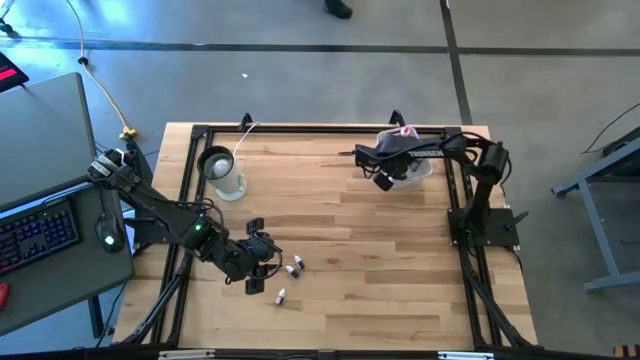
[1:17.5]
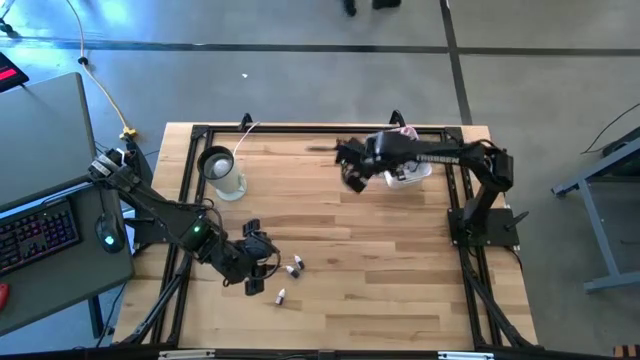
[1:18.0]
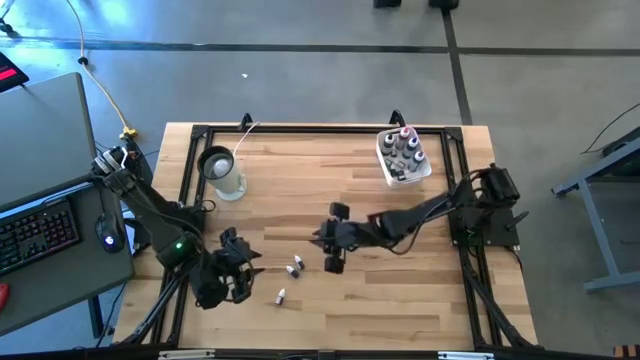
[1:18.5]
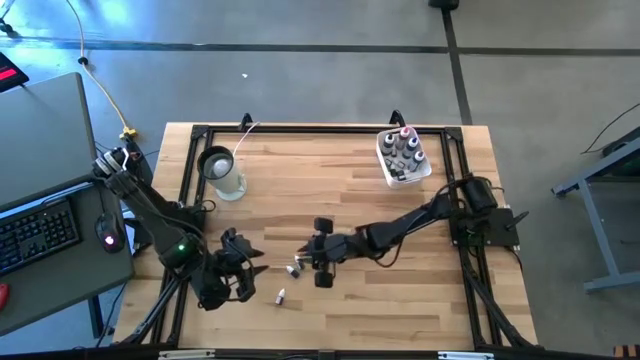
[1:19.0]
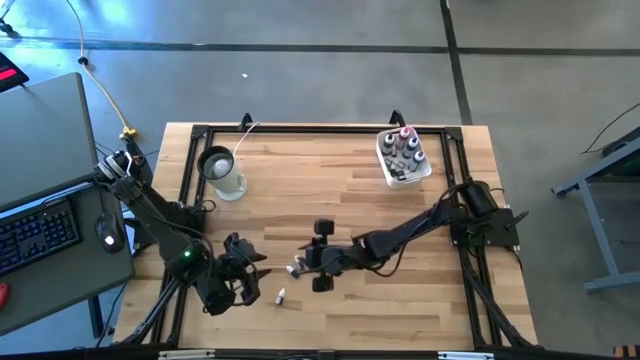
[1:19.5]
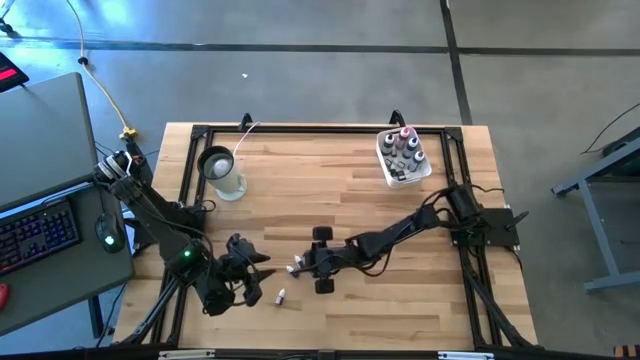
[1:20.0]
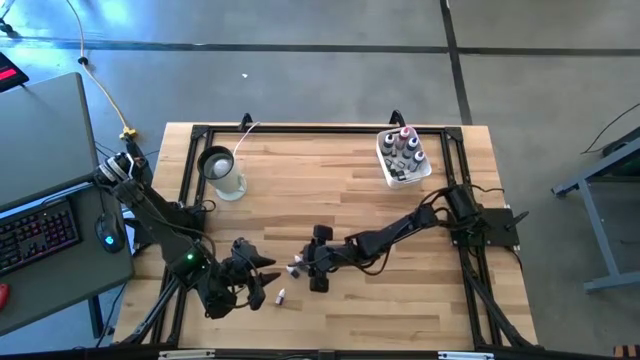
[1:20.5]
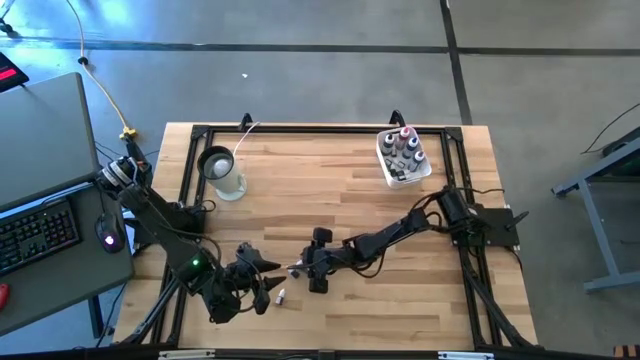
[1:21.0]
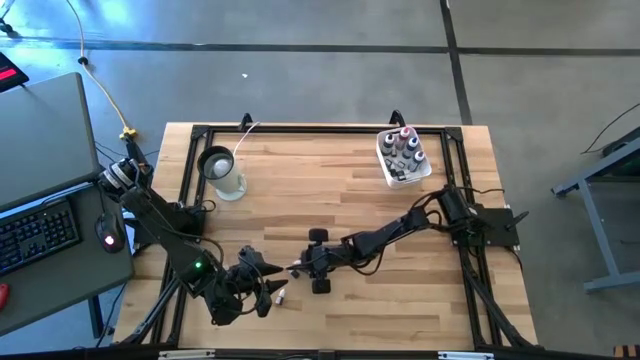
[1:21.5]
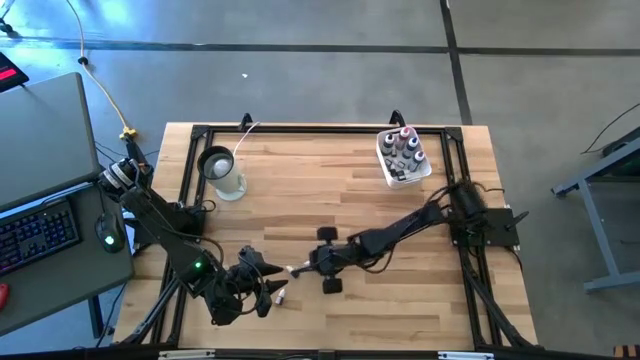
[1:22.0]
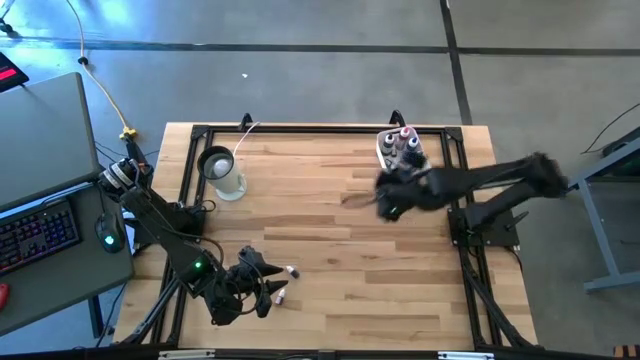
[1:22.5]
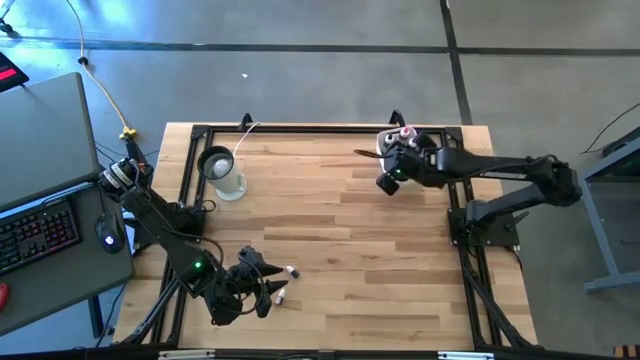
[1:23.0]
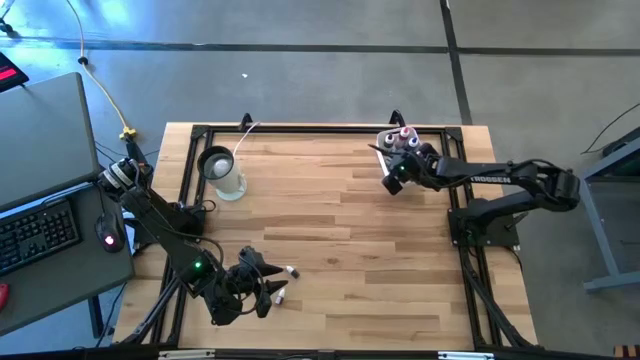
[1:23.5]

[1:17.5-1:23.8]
Task: Pick & Place food coloring
Put the small violet food coloring bottle into the white bin

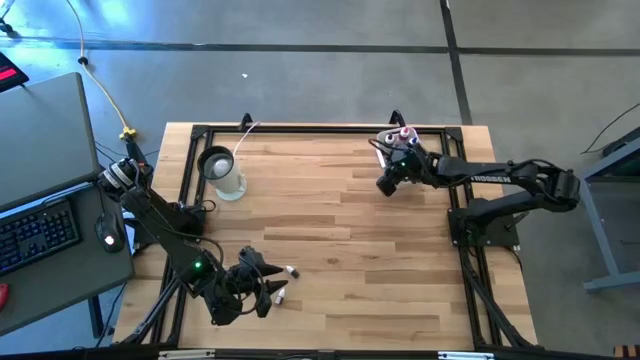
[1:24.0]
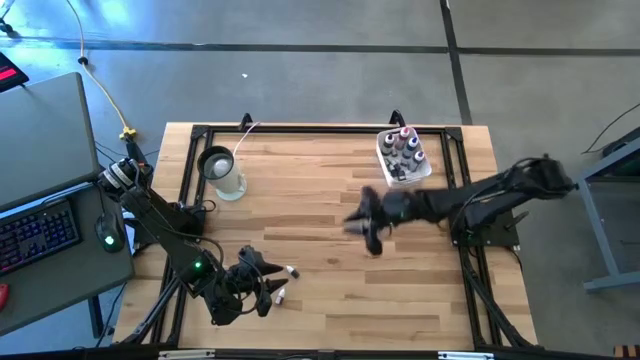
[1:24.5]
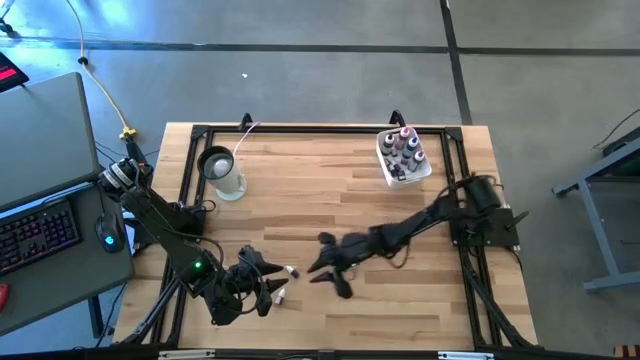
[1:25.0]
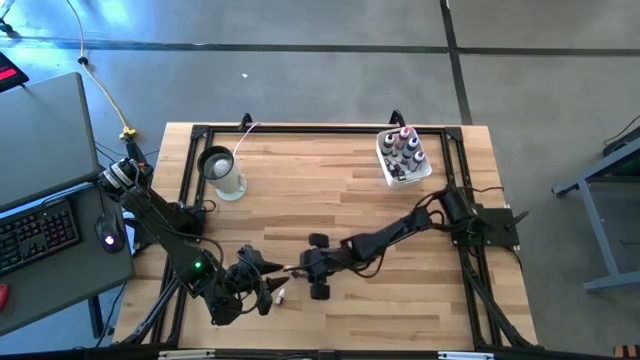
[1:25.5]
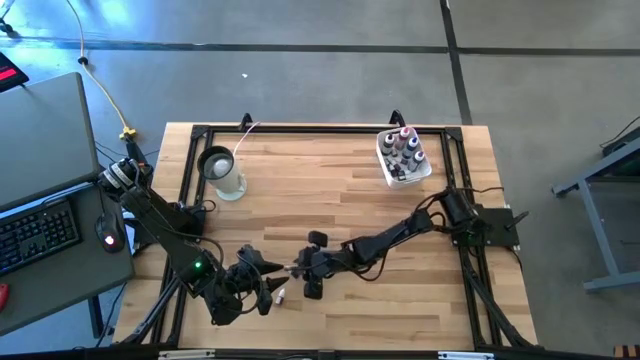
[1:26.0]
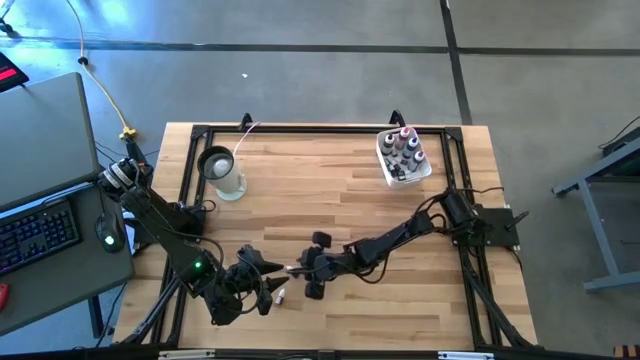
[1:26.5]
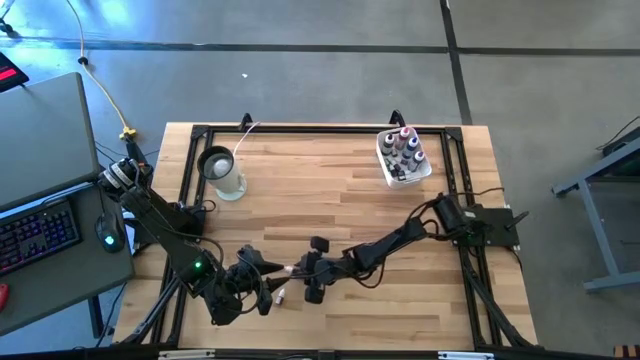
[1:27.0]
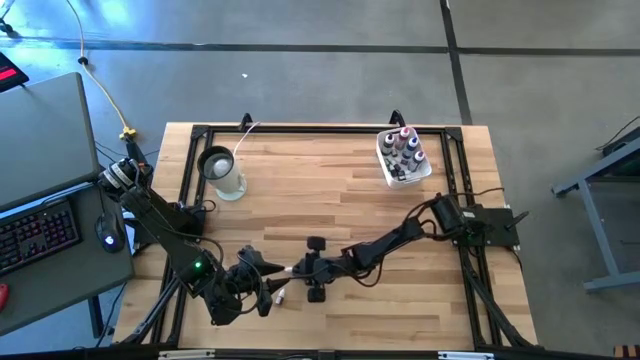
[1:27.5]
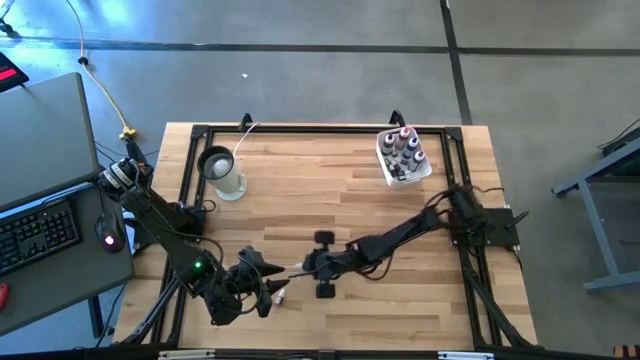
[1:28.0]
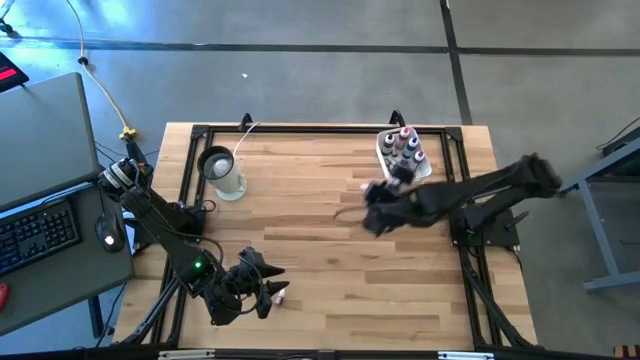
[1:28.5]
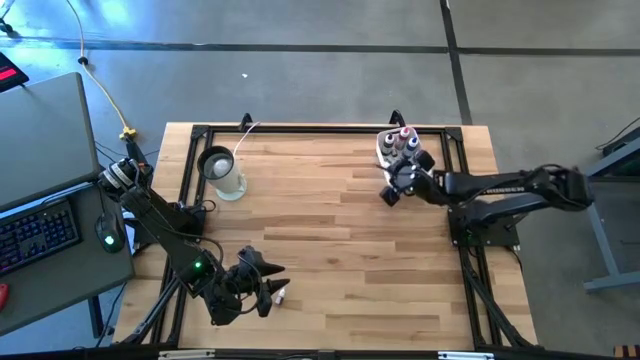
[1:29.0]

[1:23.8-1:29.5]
Put the small black food coloring bottle into the white bin

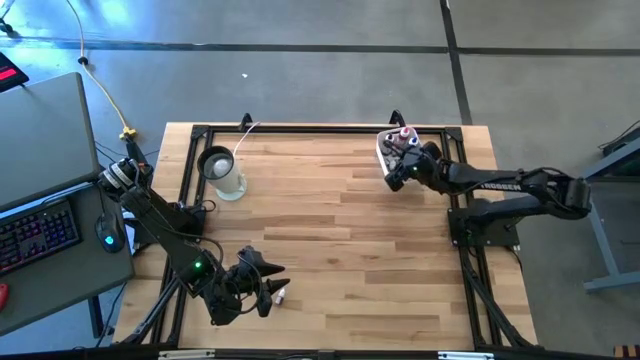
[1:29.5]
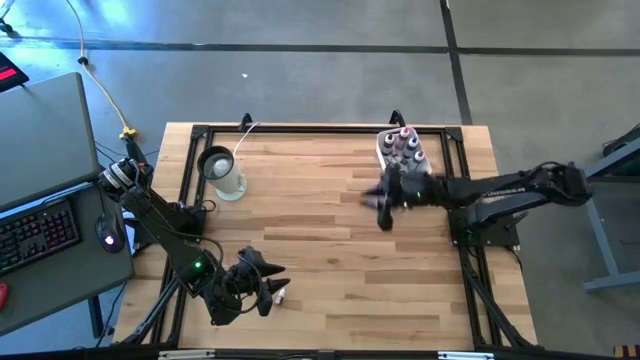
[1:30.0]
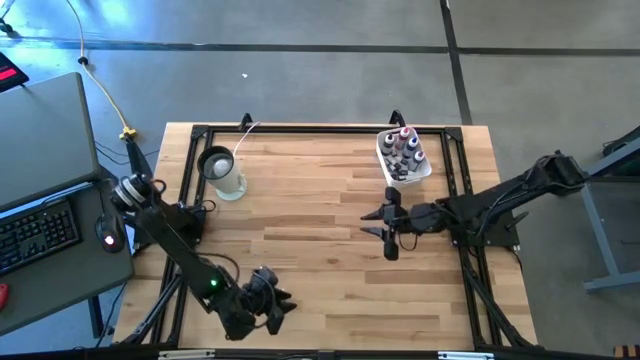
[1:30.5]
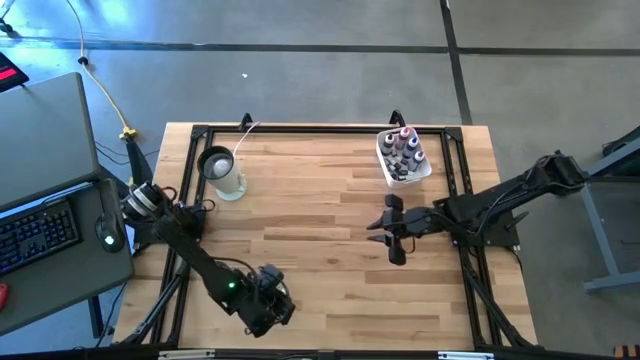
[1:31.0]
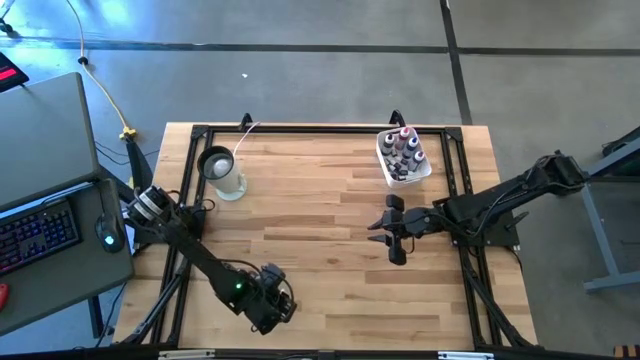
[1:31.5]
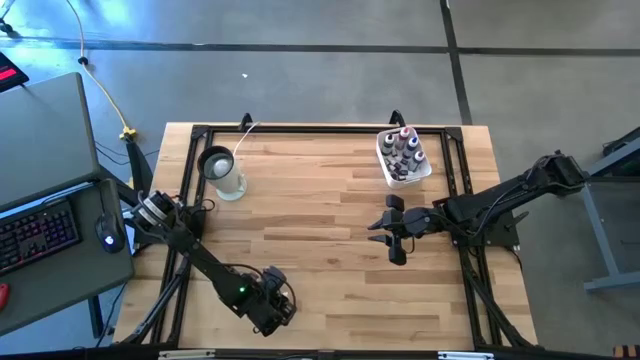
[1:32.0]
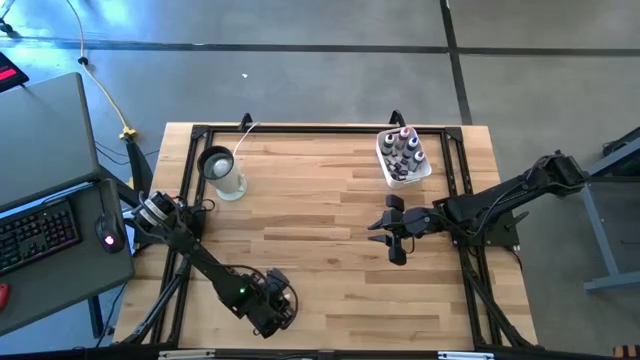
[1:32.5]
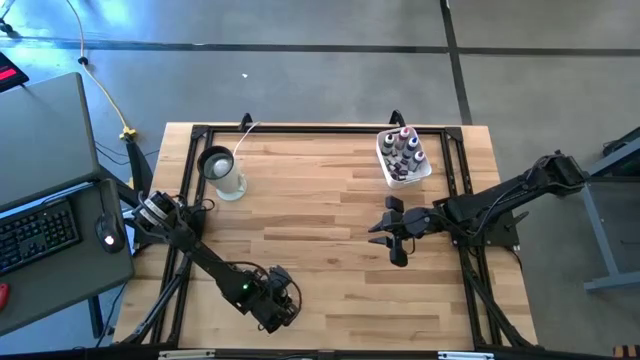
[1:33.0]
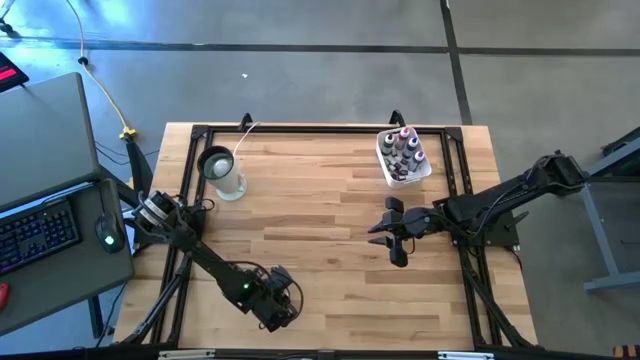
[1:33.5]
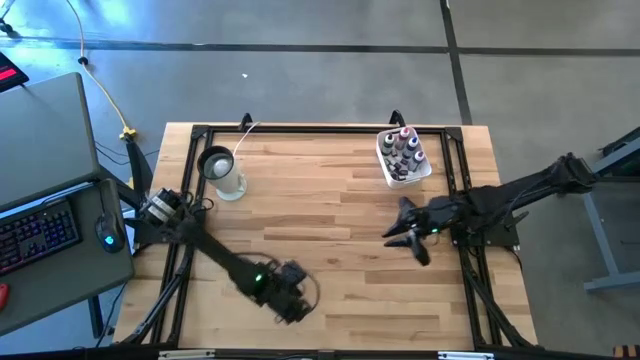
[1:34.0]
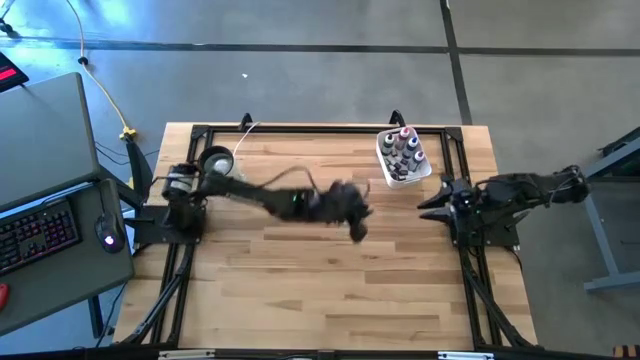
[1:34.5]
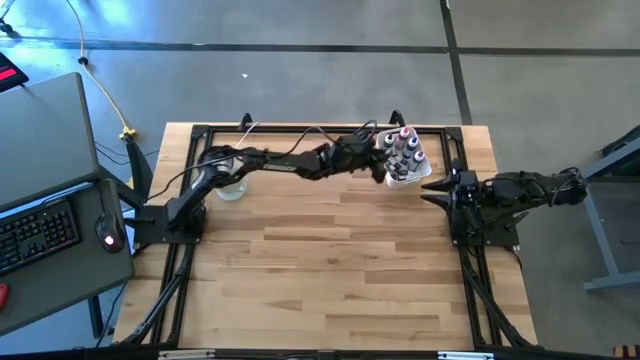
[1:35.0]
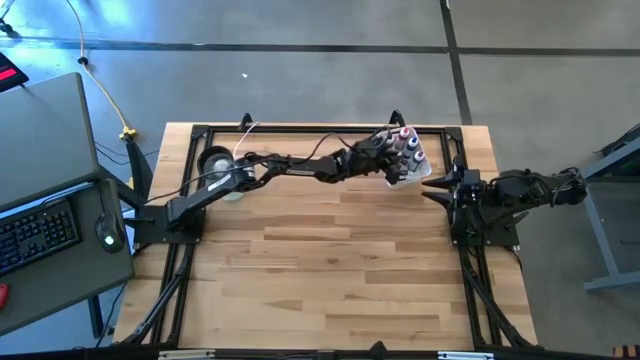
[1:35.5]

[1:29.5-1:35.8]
Put the small orange food coloring bottle into the white bin

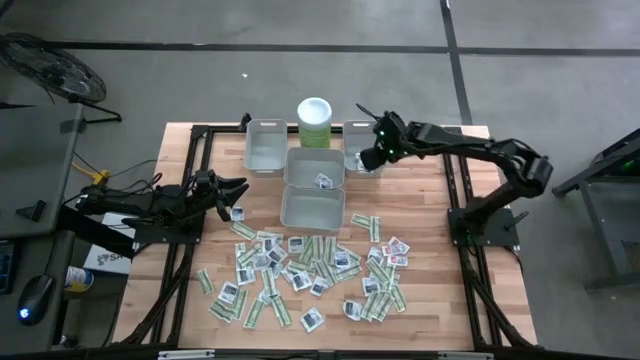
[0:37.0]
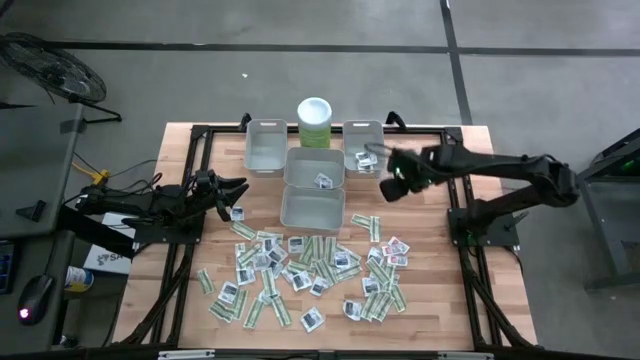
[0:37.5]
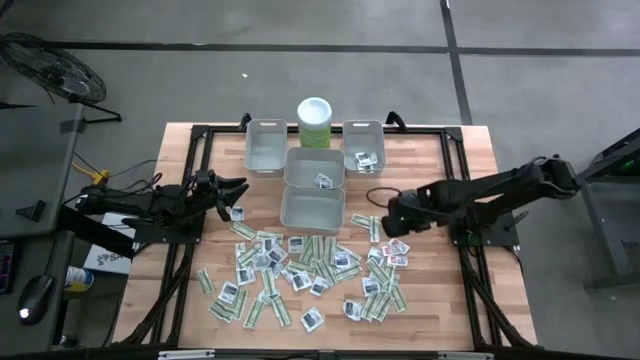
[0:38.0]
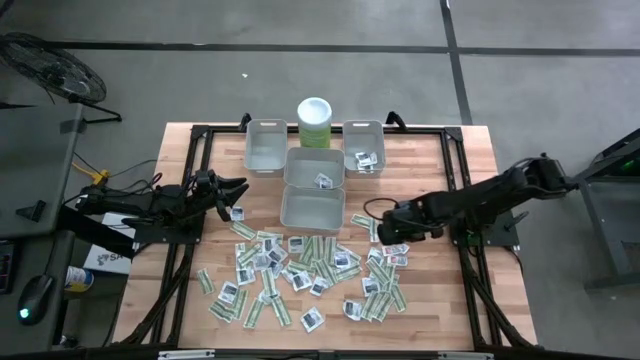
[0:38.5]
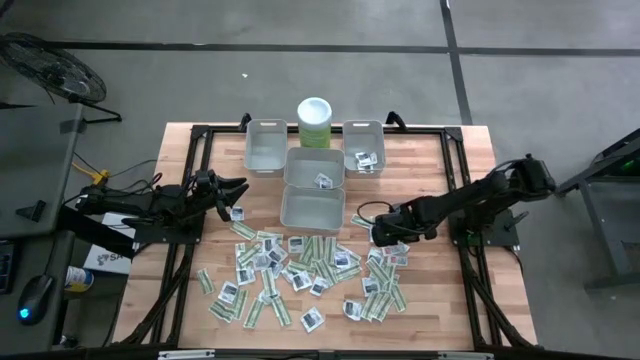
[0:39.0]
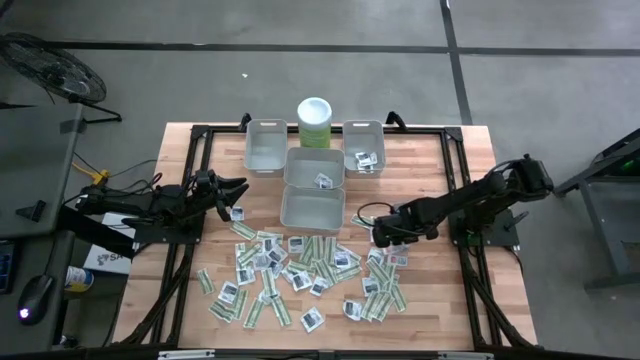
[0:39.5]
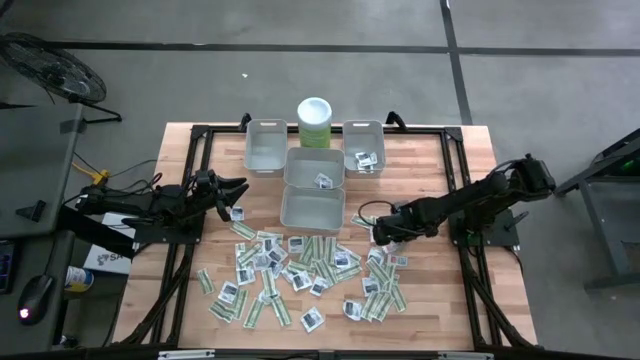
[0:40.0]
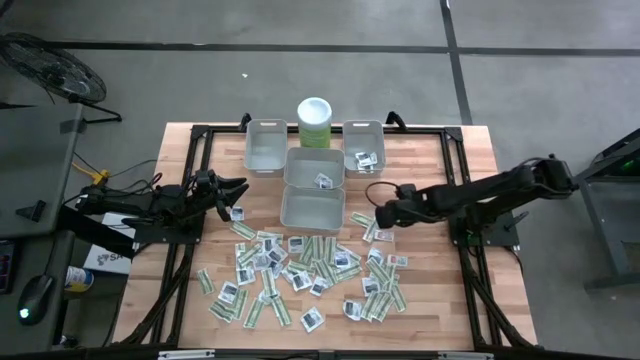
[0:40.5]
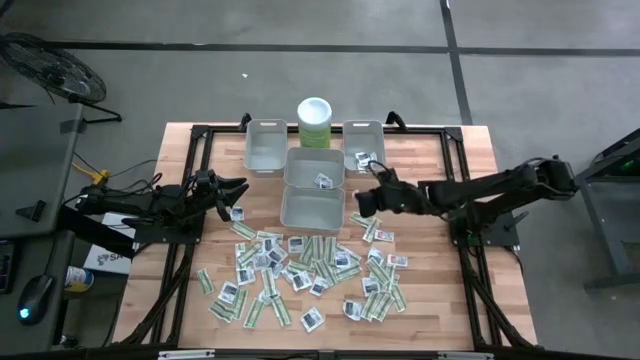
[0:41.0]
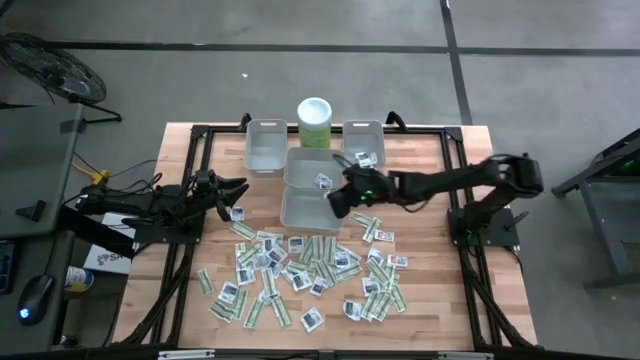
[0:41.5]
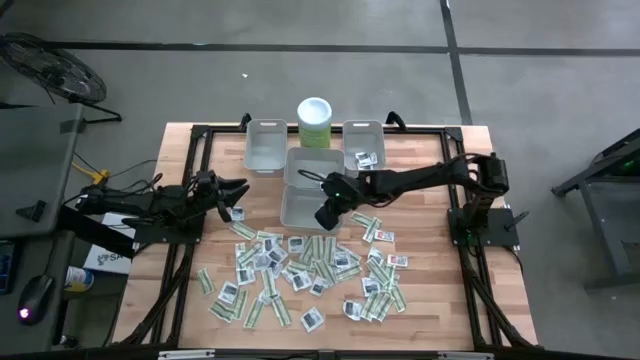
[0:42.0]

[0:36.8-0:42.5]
Task: Pick & Place First Aid Supplies
Put the ointment pack into the bottom center bin
